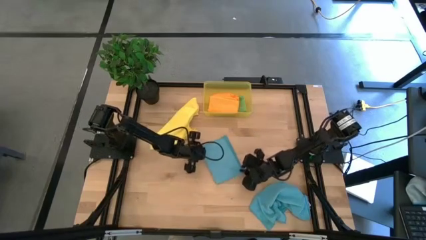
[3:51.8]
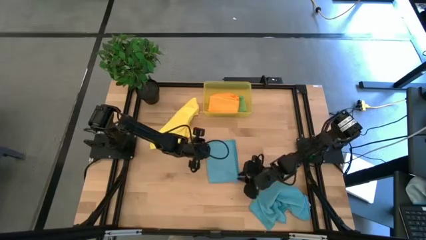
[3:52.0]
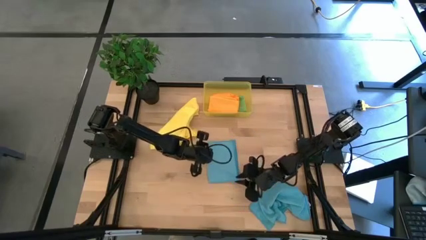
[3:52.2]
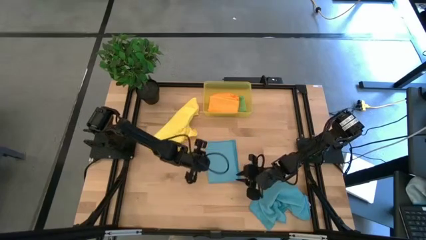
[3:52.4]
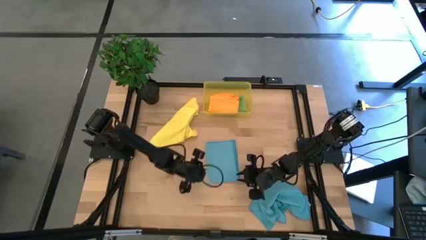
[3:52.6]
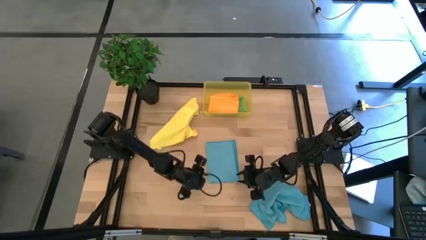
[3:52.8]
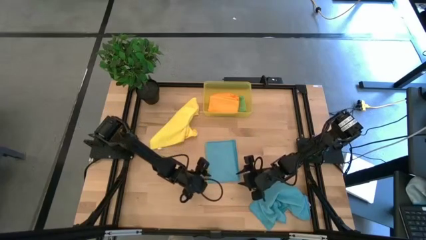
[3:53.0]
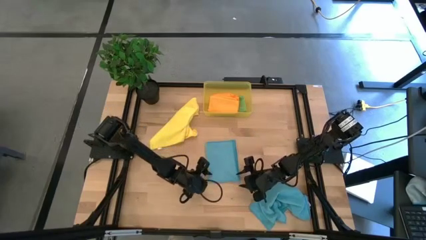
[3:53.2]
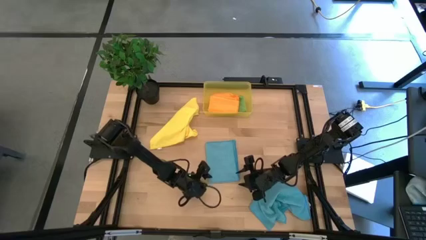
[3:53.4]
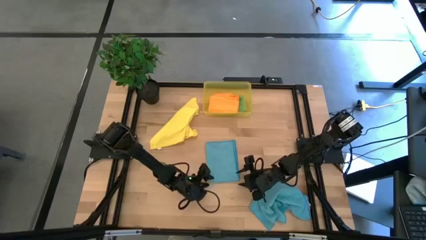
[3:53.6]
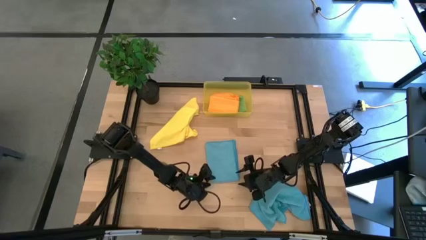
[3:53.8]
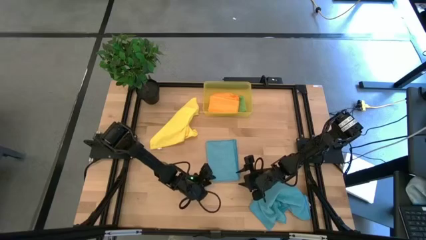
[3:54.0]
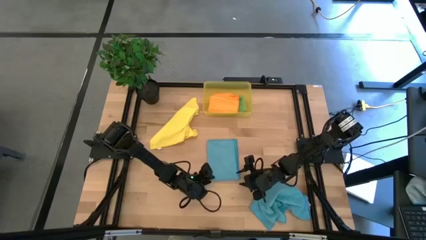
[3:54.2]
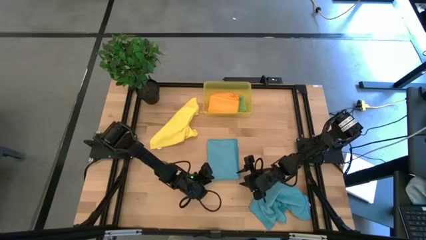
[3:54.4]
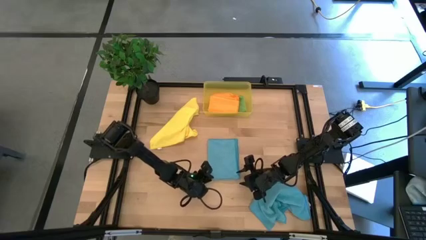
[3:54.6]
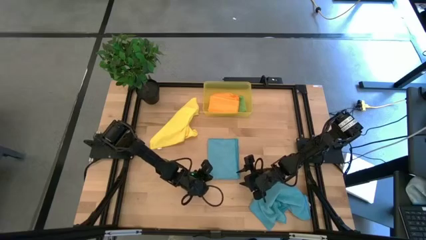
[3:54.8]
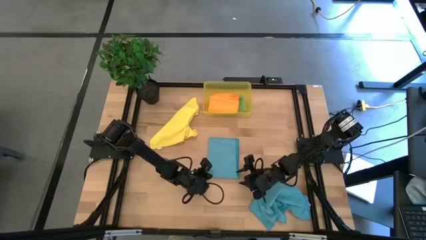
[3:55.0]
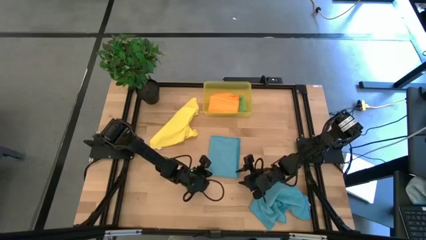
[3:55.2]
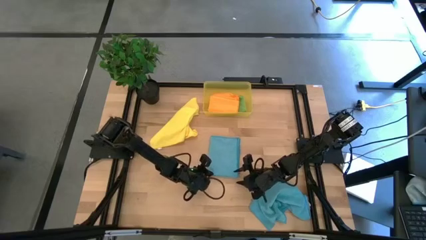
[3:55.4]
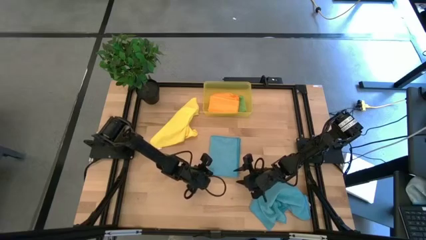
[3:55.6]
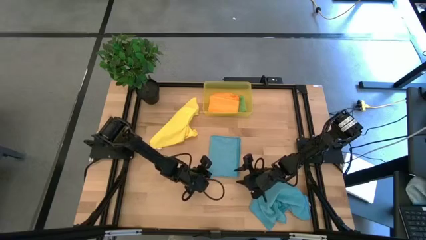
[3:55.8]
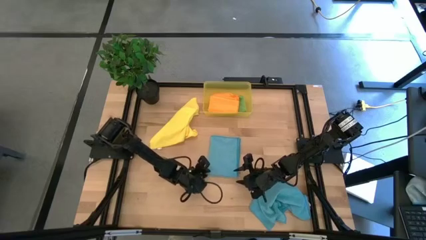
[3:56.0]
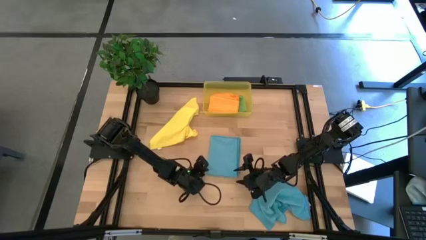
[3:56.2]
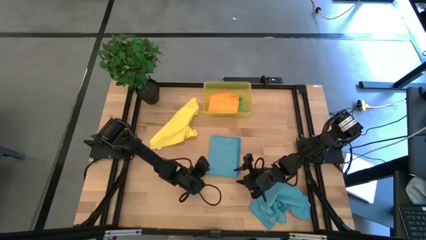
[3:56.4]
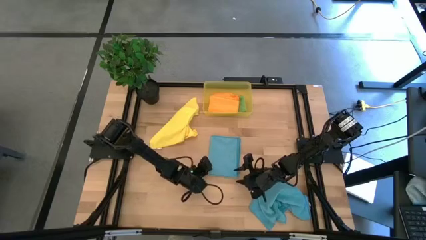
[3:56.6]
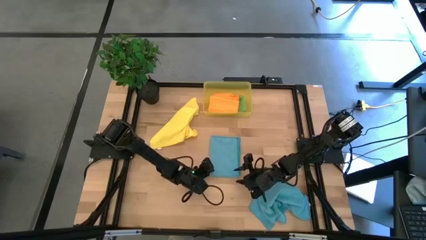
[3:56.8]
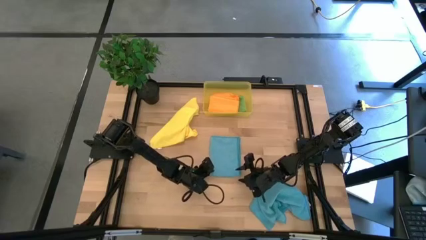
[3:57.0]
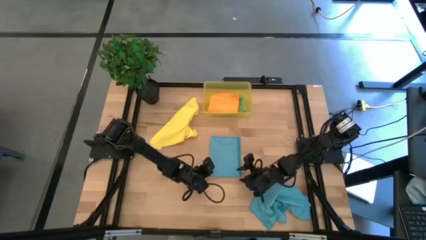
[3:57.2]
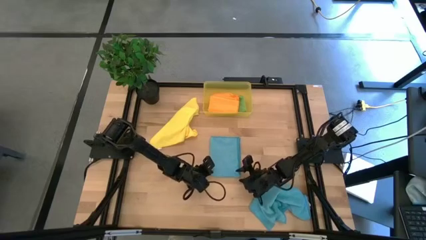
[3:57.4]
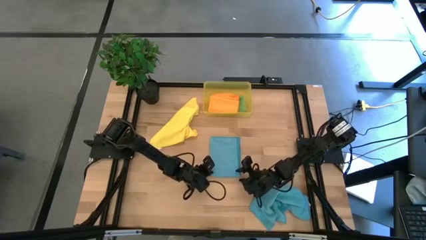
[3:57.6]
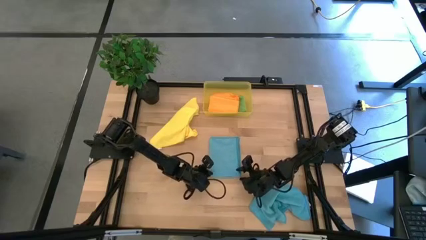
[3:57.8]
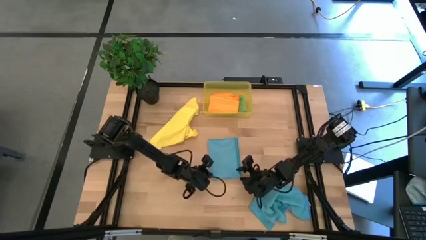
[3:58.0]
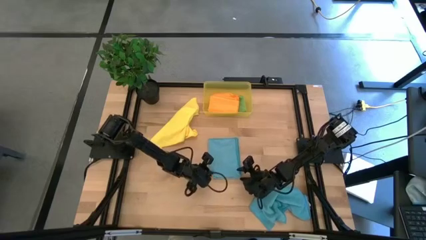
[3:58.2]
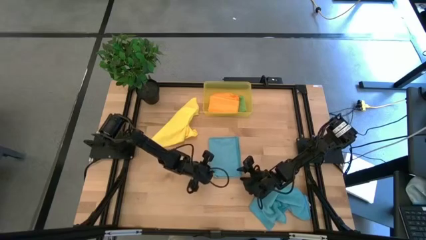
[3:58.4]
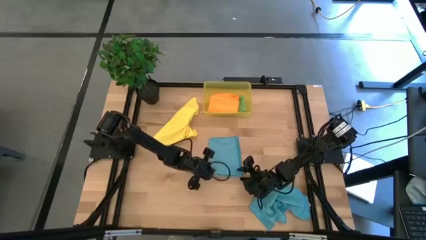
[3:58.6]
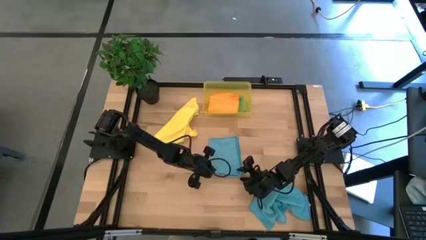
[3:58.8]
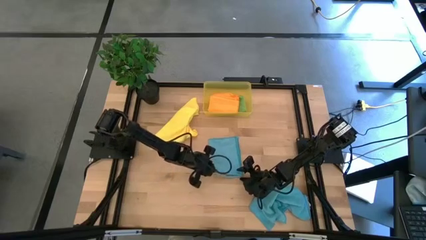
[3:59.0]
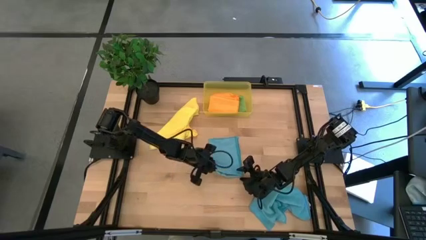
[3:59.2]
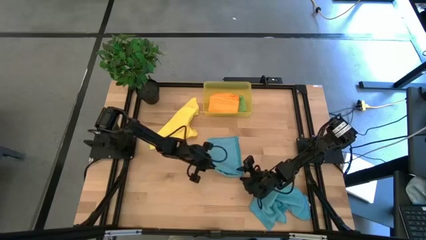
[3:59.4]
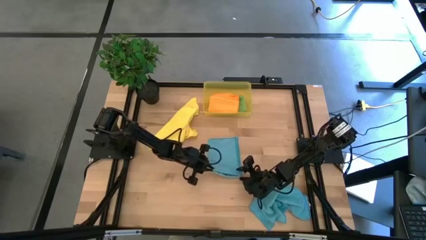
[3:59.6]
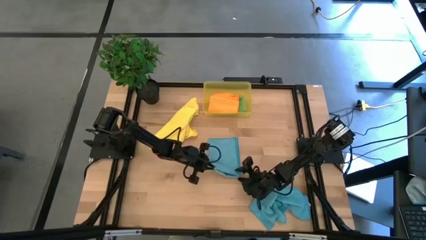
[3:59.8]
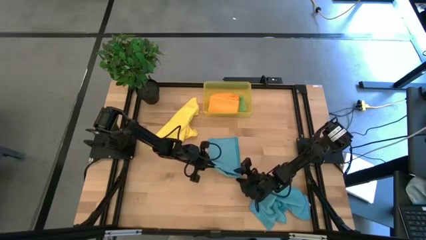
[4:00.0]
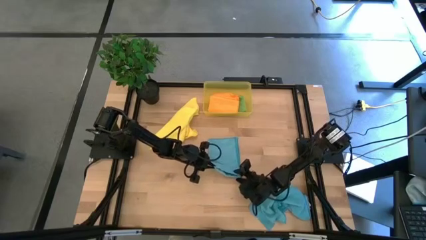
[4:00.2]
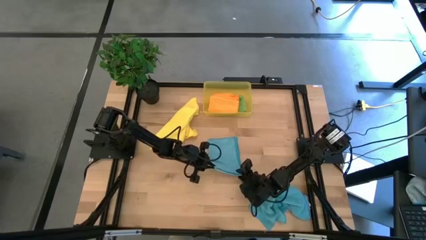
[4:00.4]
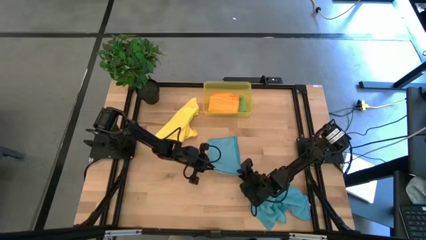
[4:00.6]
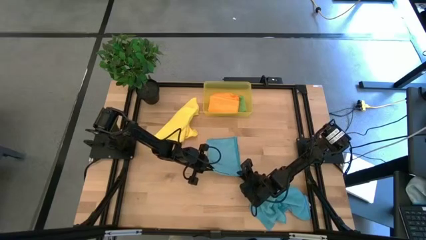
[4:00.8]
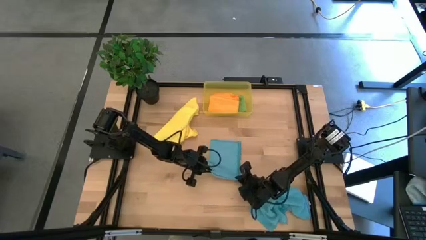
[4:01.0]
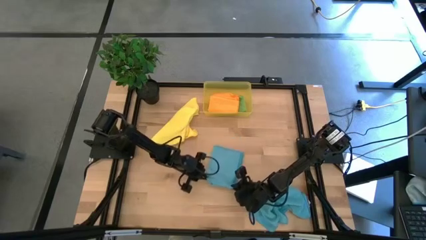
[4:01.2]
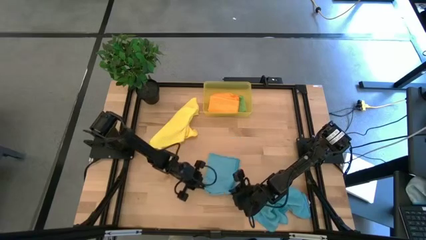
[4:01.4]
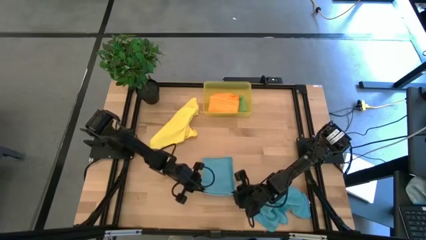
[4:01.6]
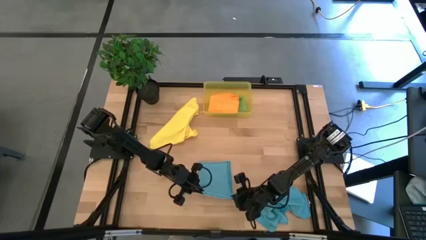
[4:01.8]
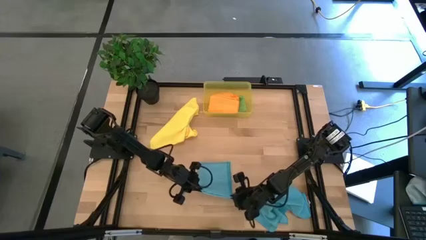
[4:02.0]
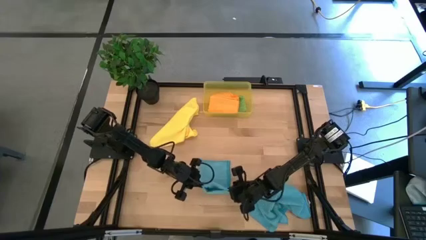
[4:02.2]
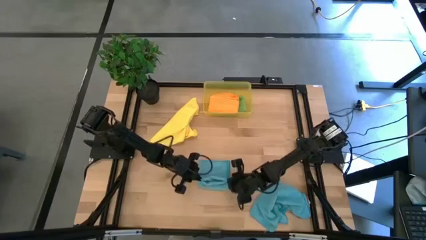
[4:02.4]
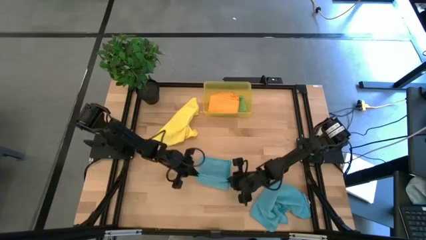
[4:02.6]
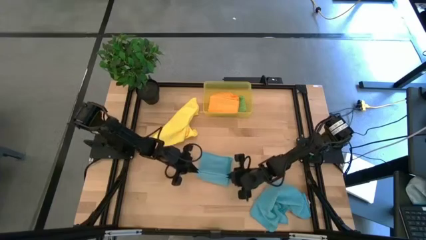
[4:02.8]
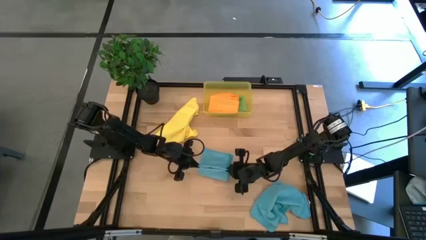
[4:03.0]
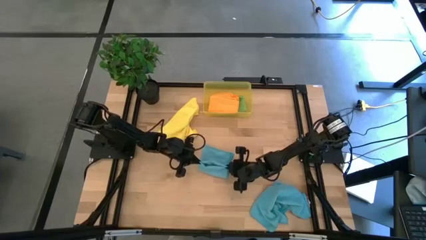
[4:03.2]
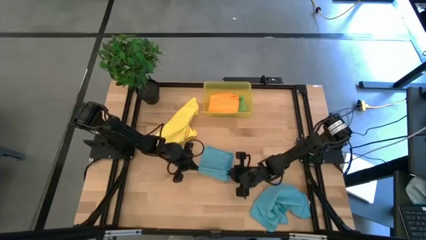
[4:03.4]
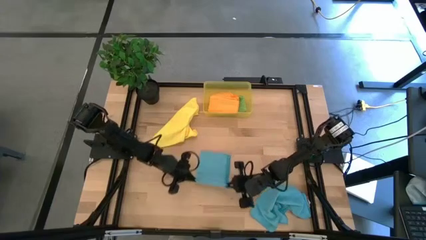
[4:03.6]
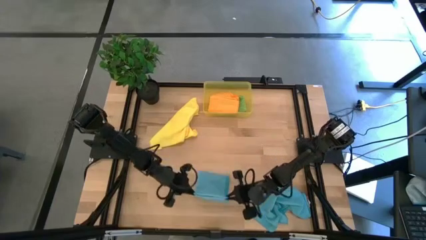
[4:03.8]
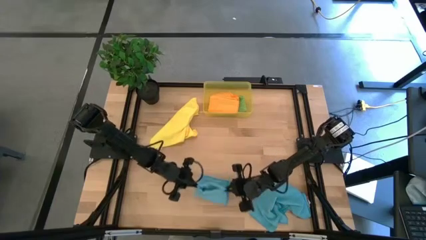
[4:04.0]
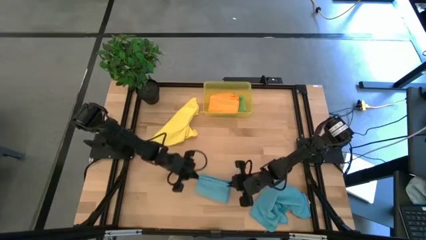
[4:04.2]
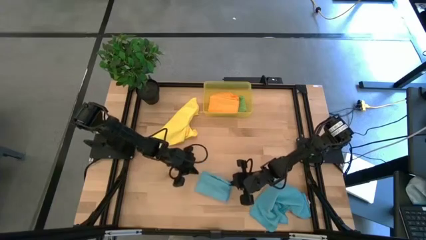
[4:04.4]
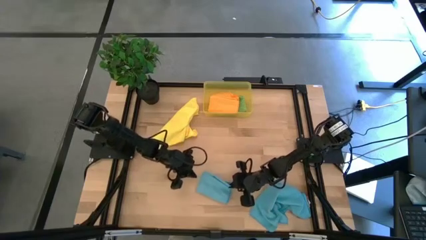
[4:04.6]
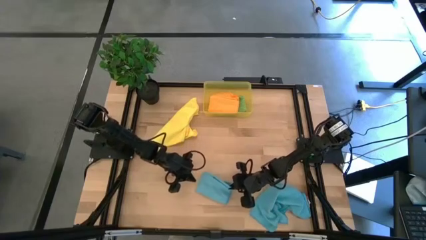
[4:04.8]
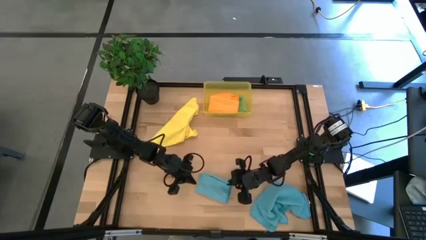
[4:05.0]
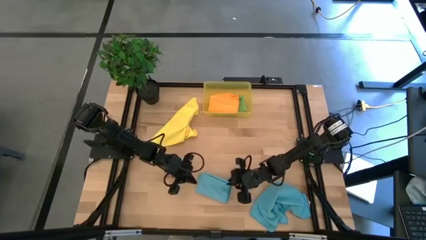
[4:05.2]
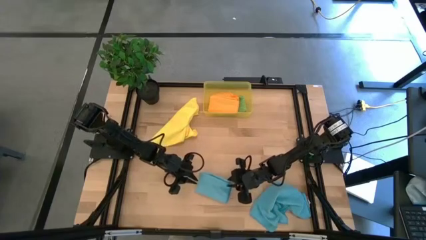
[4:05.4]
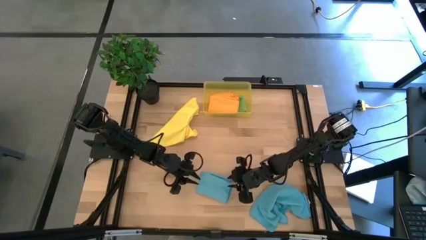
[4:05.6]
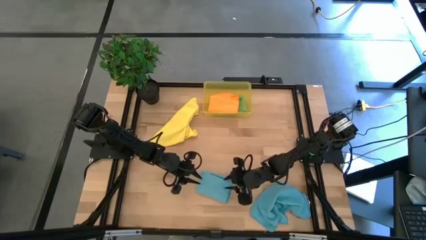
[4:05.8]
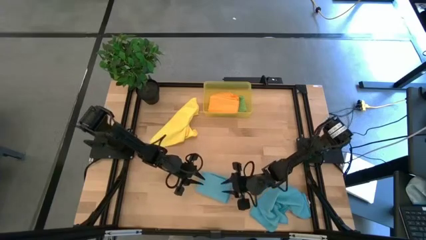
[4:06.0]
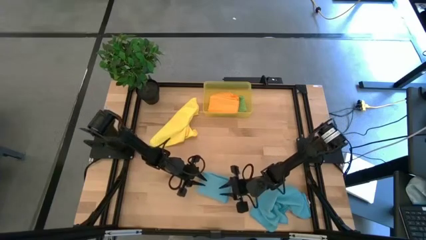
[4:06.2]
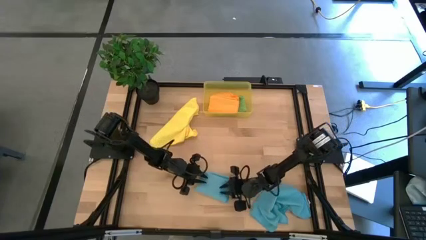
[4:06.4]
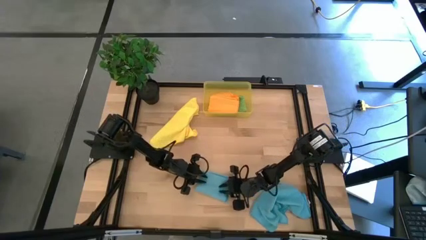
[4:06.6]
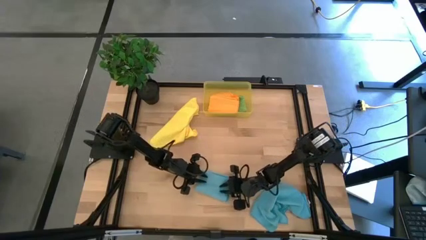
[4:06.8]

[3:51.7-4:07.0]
Task: Fold microfiber towels
Fold the top blue microfiber cloth
